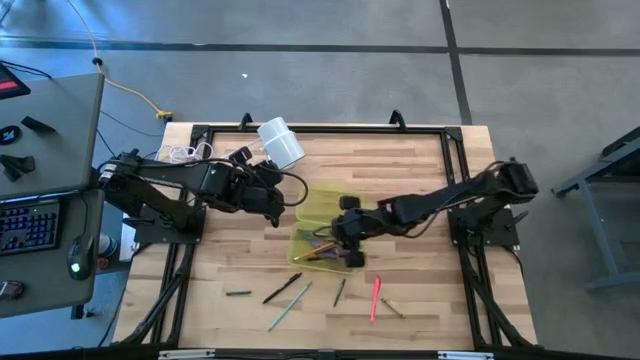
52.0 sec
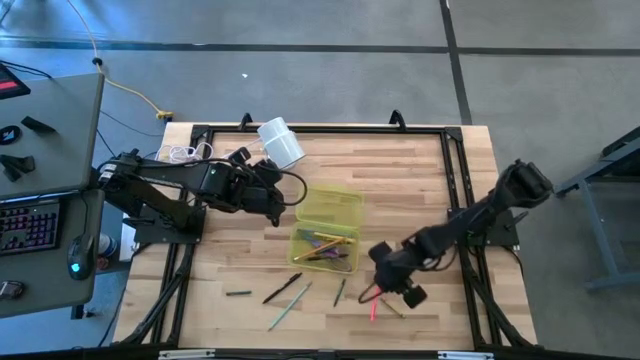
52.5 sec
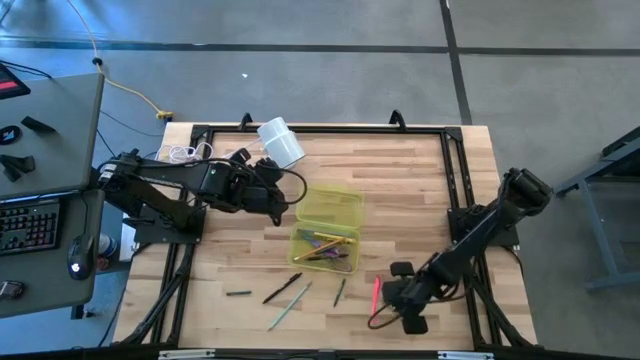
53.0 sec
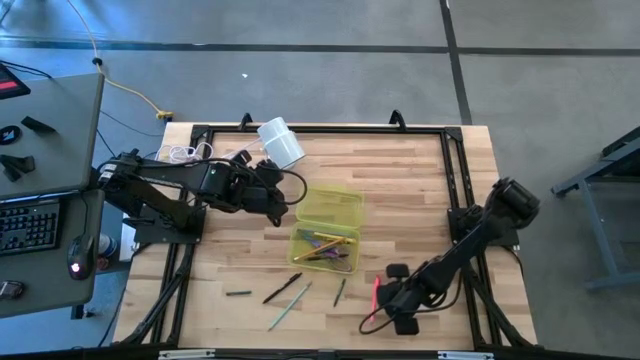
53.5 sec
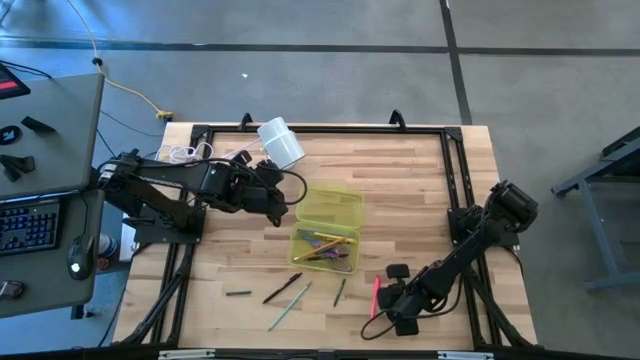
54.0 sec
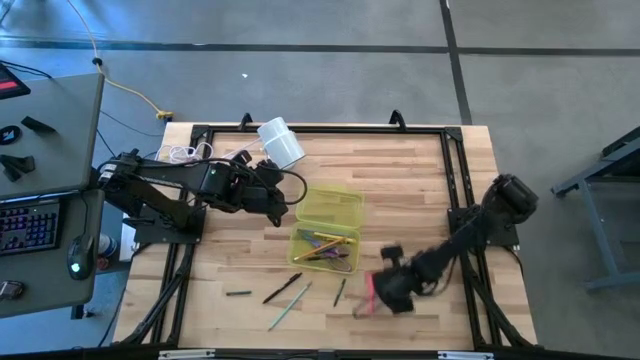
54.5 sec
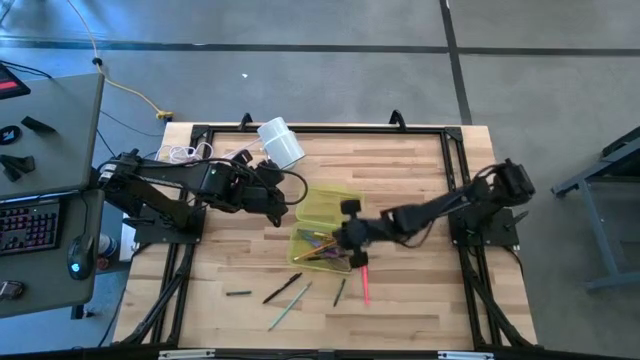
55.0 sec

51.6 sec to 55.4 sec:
Task: Pick & place school supplies into a supply box
Put the green crayon into the supply box

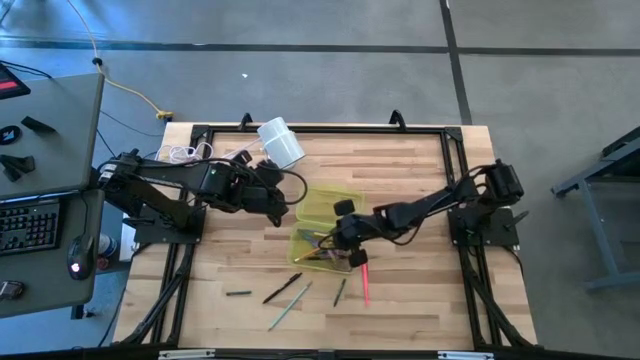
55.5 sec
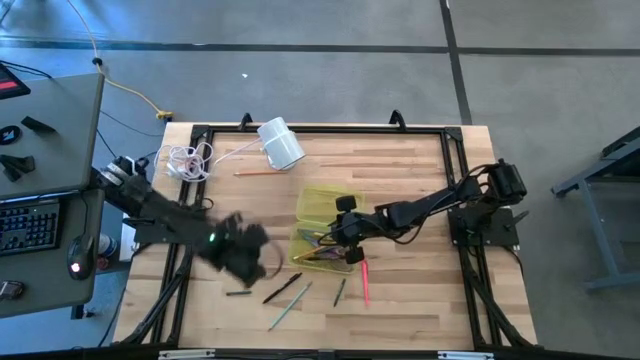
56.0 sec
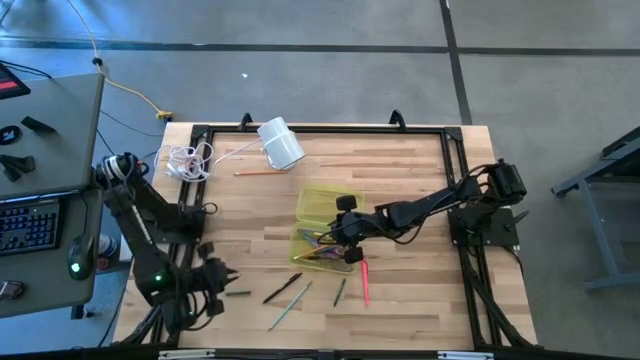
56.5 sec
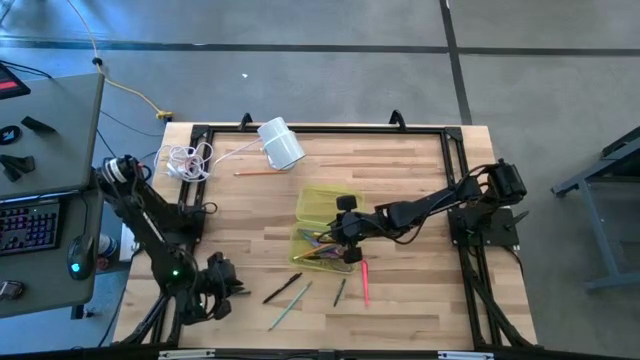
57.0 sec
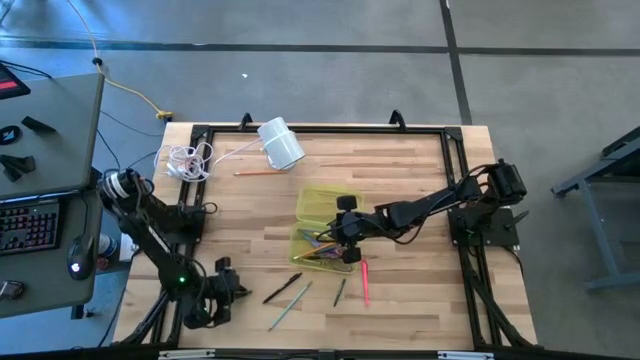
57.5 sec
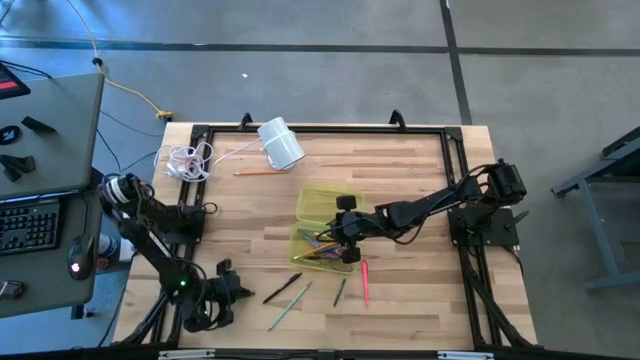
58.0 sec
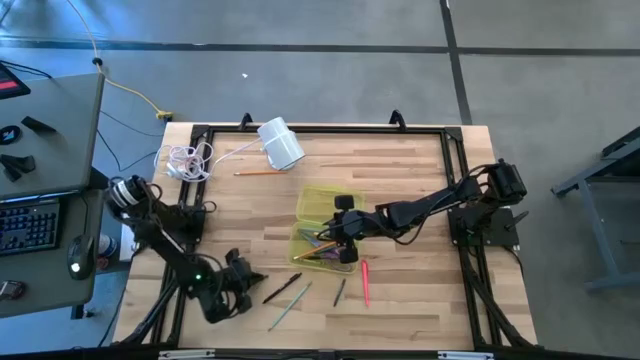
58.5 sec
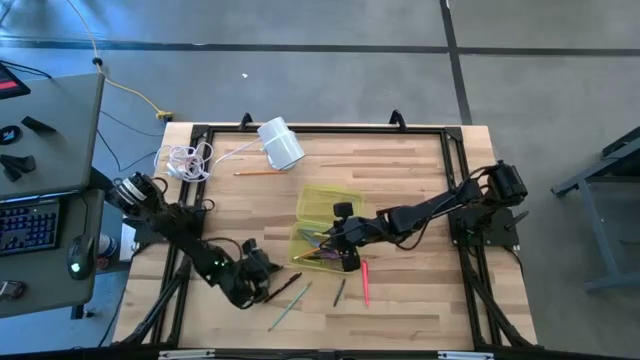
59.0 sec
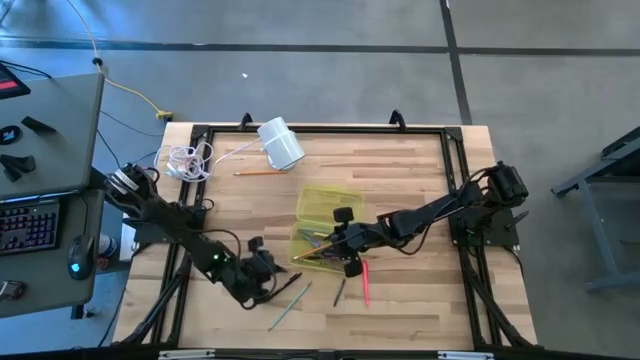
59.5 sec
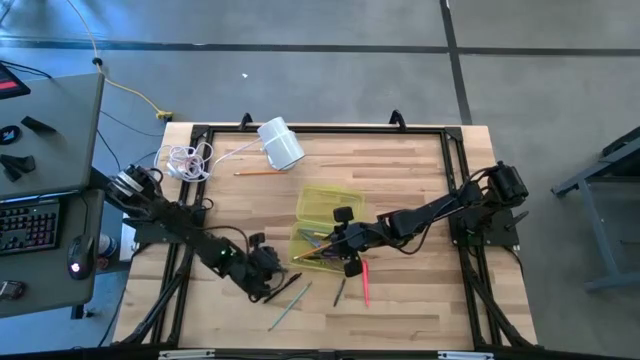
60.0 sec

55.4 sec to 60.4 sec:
Put the left dark green crayon into the supply box

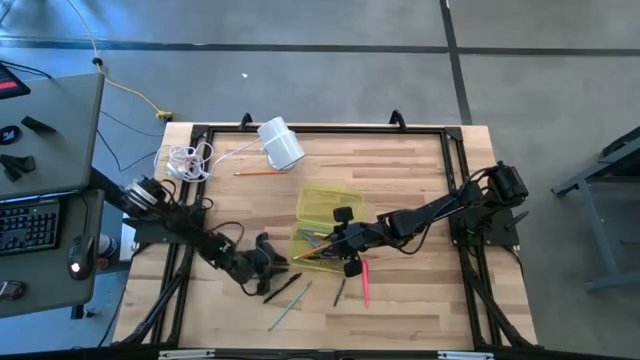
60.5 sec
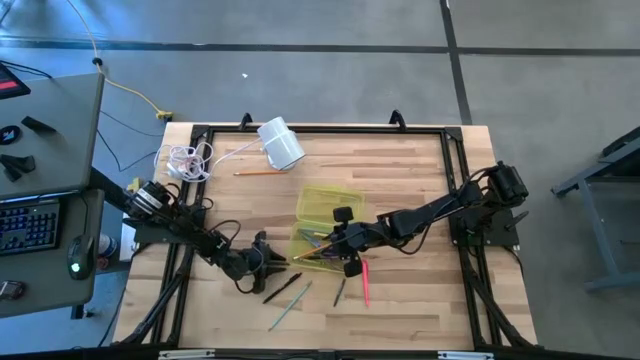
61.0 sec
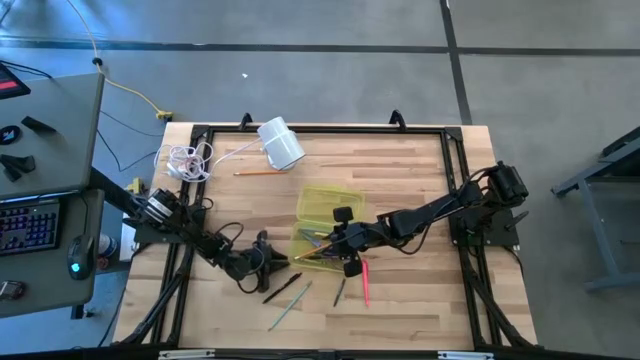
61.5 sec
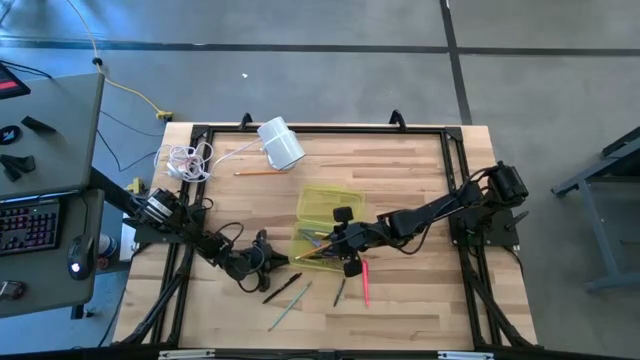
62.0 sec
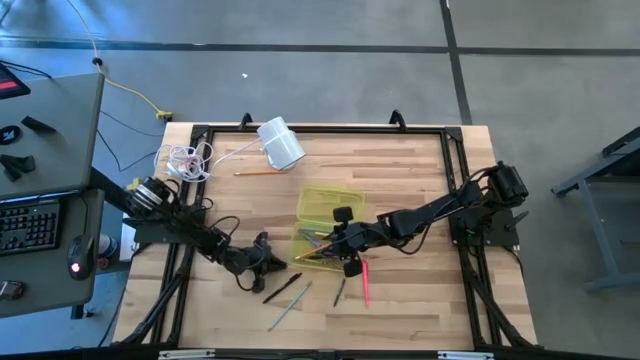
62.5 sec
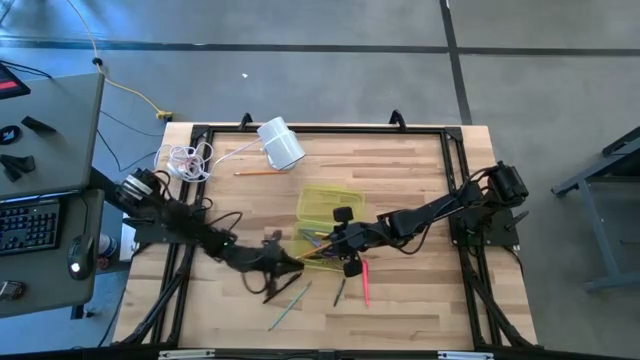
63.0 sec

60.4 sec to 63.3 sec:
Put the left dark green crayon into the supply box

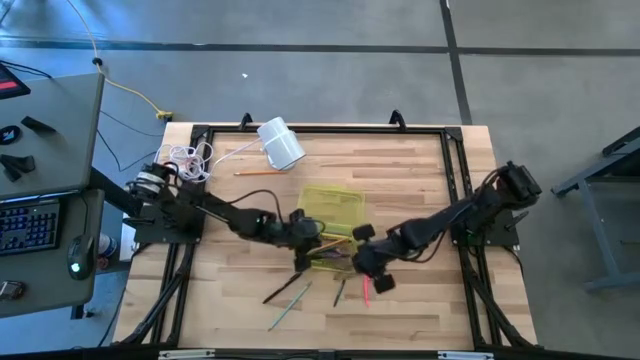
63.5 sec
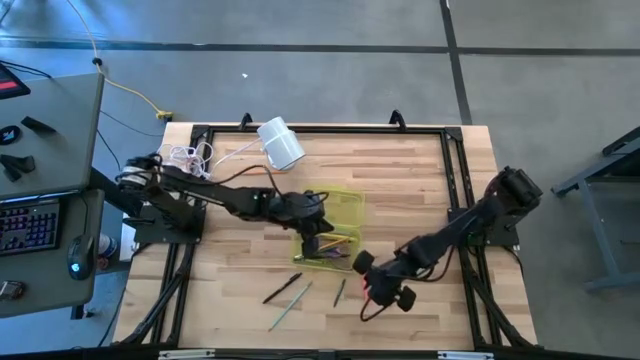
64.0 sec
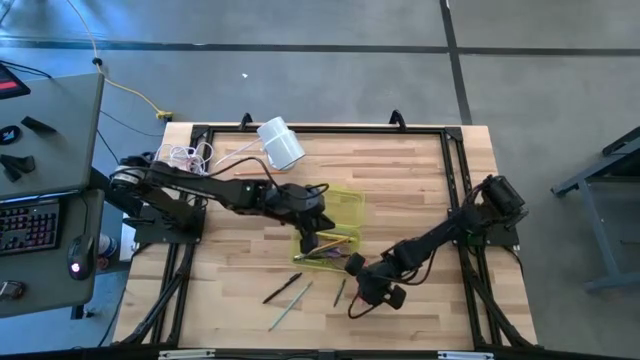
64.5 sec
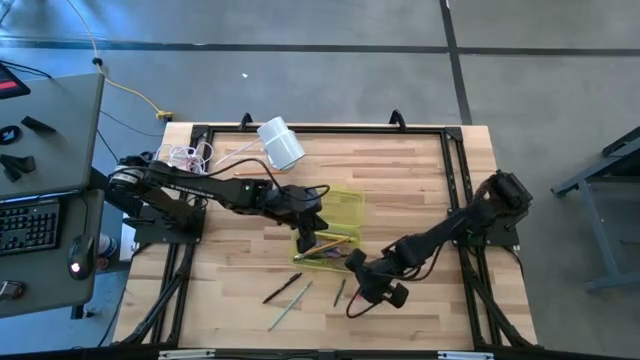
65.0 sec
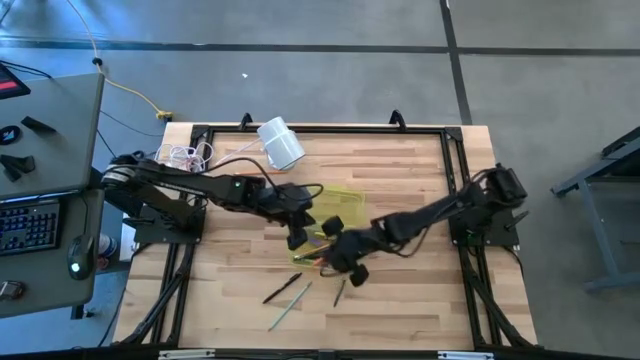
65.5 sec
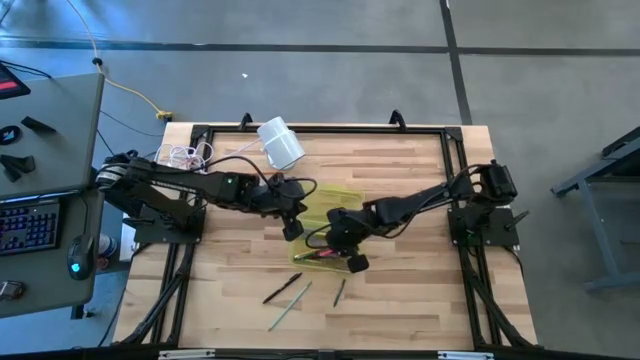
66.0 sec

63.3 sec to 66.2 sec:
Put the pink pen into the supply box

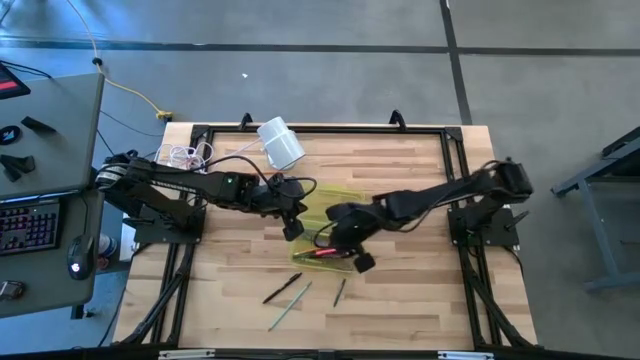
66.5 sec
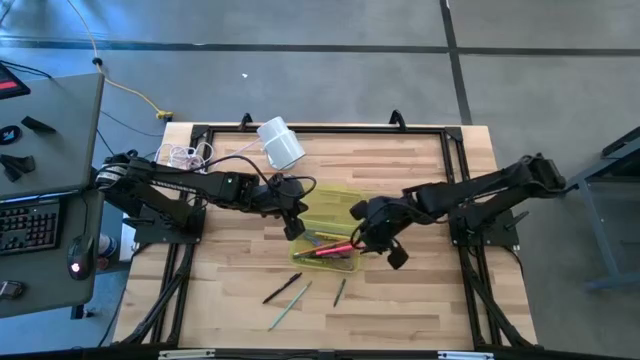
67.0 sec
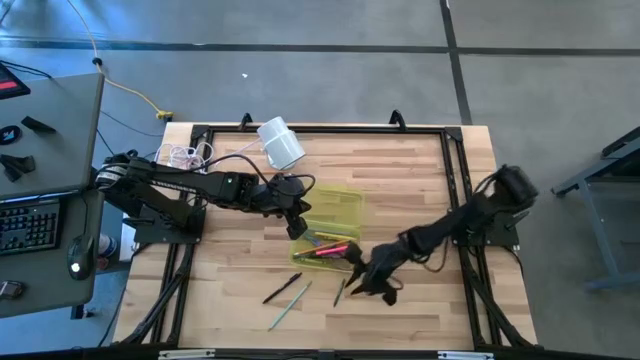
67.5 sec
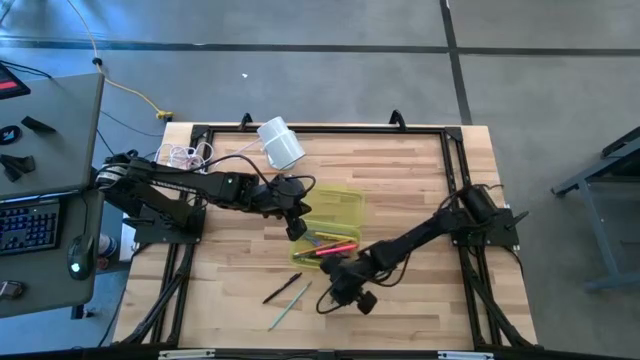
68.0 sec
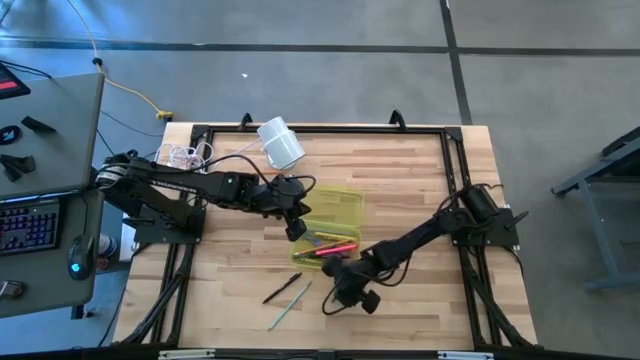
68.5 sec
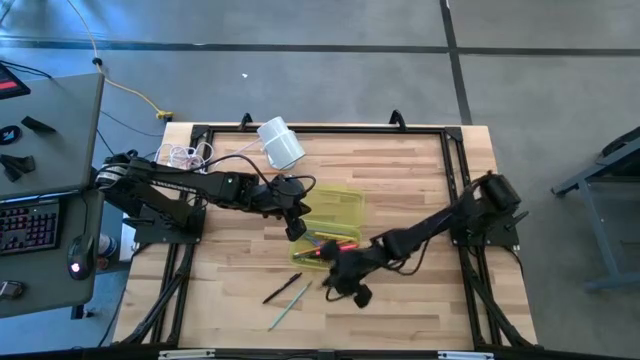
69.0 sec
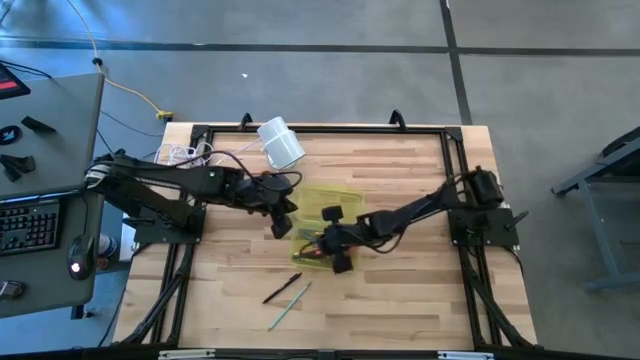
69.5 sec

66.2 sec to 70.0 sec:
Put the dark green crayon into the supply box

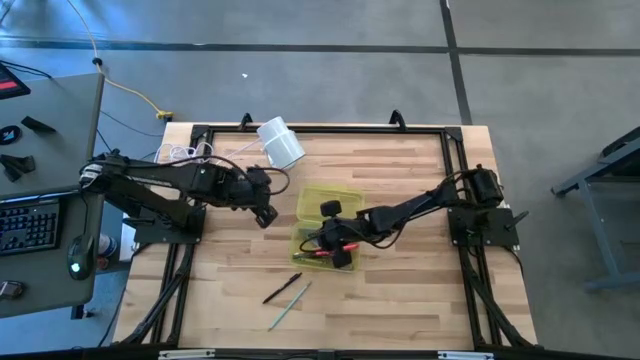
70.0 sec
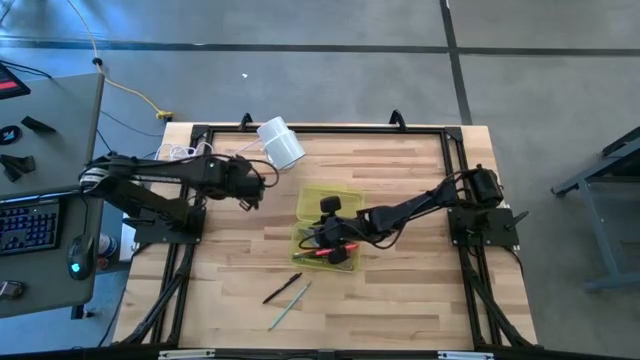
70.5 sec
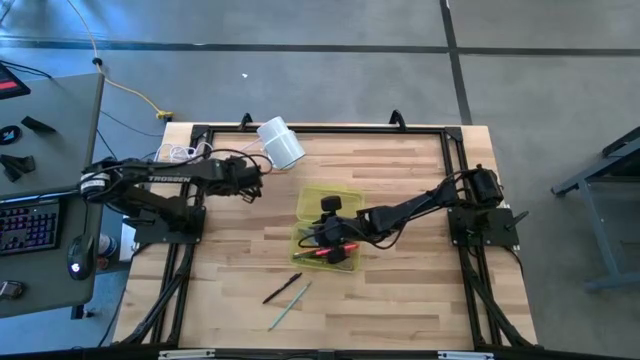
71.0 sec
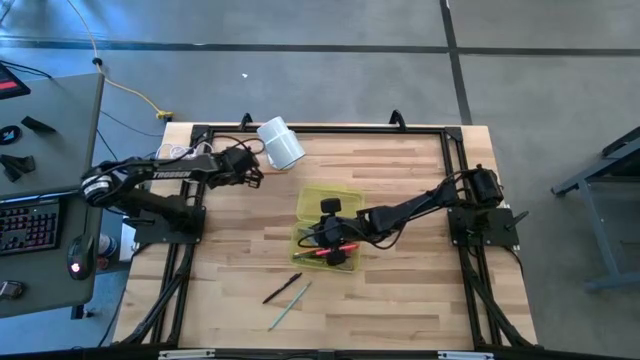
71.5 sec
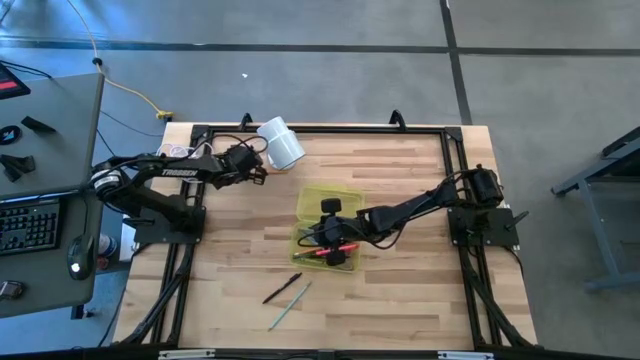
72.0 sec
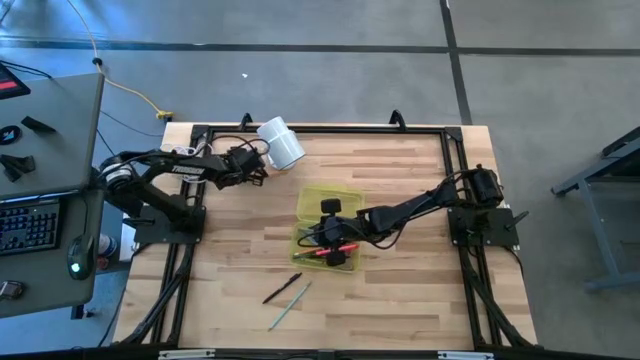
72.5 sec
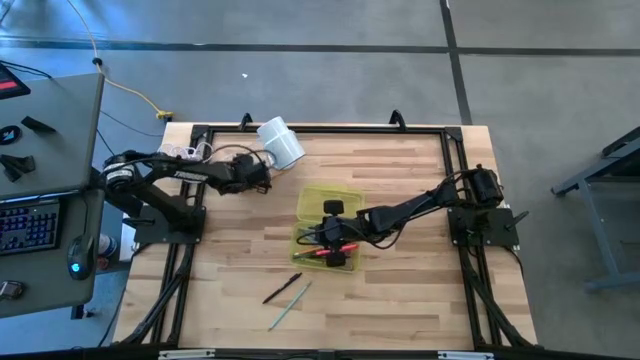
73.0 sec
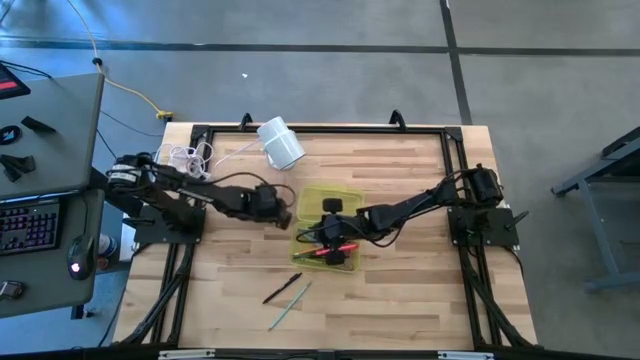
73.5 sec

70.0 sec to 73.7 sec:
Adjust the orange pencil
